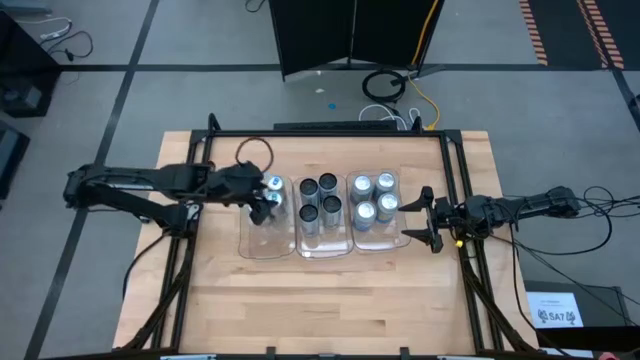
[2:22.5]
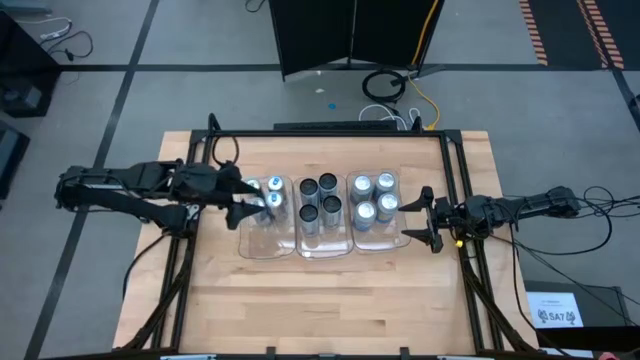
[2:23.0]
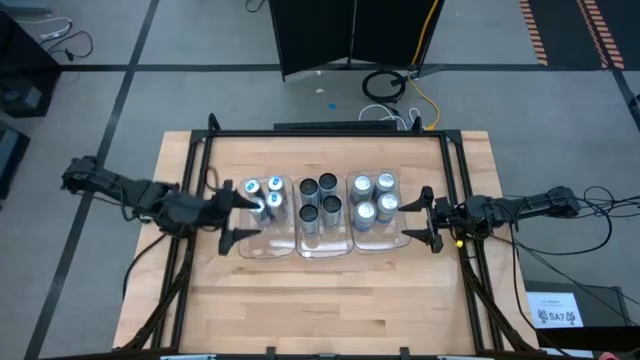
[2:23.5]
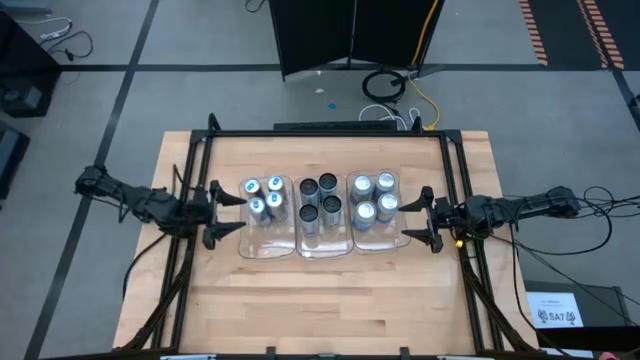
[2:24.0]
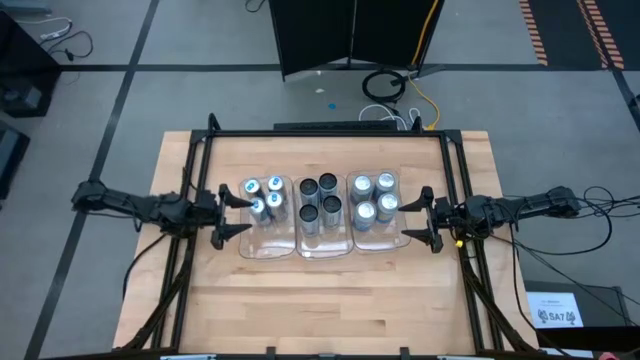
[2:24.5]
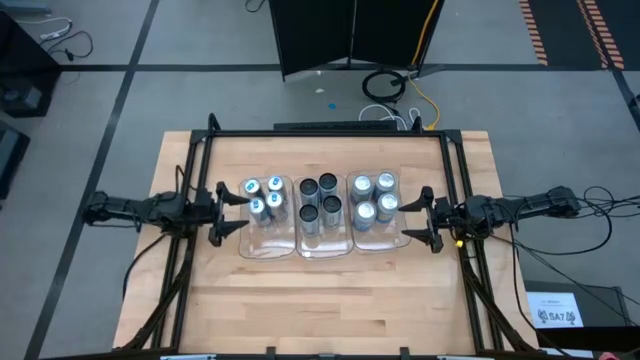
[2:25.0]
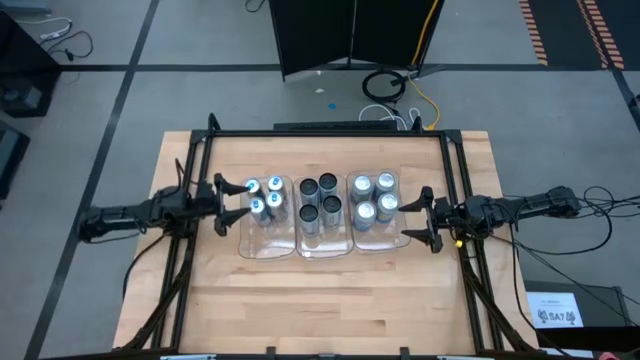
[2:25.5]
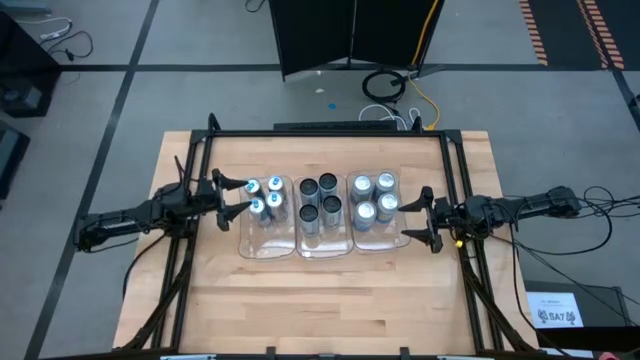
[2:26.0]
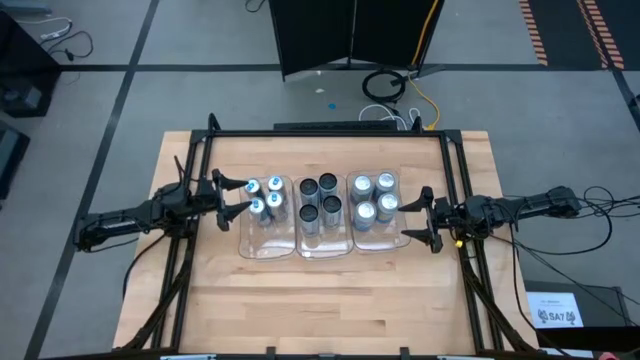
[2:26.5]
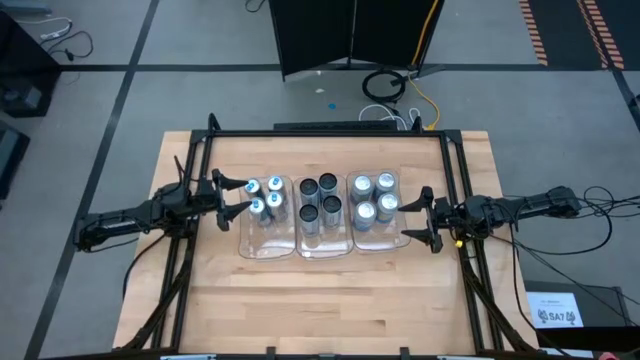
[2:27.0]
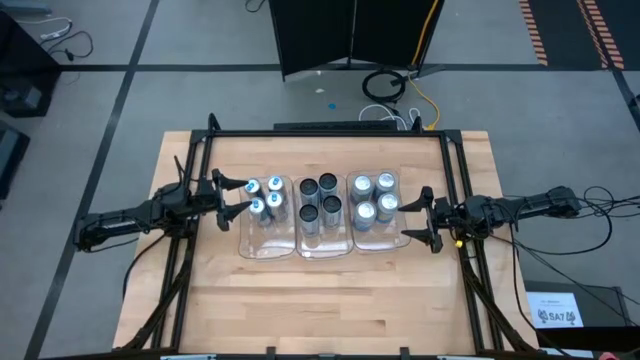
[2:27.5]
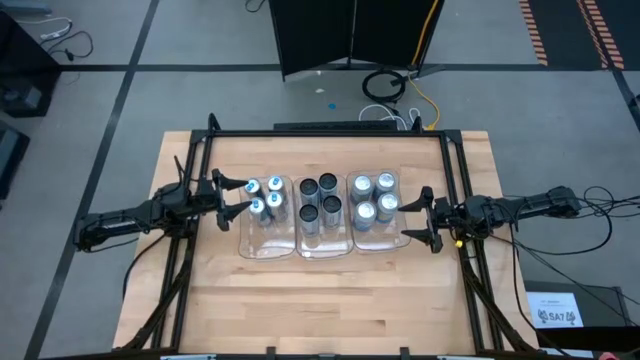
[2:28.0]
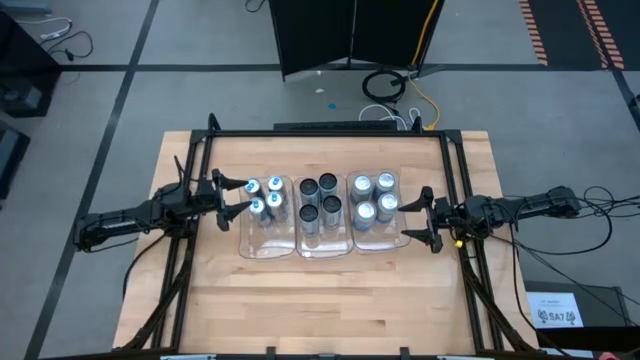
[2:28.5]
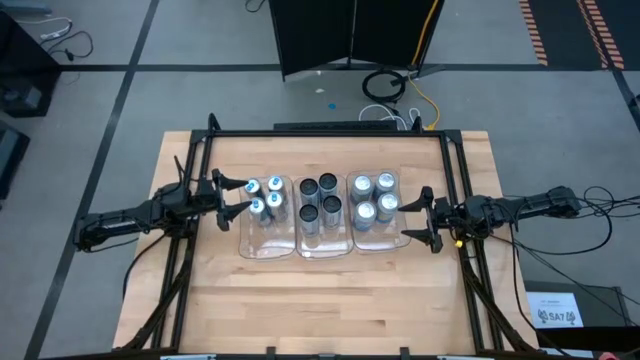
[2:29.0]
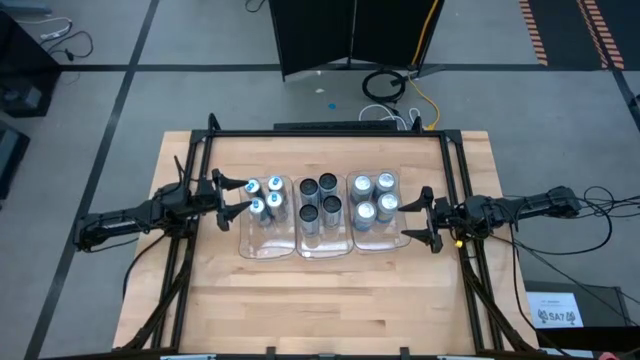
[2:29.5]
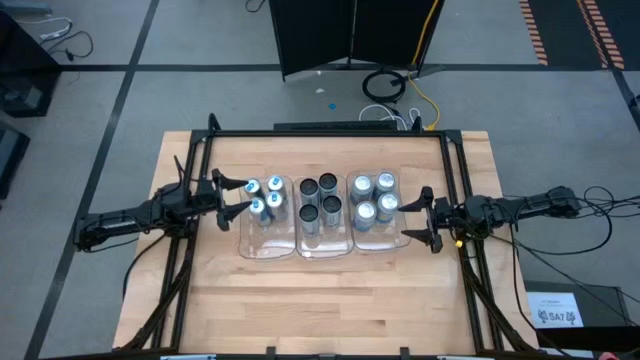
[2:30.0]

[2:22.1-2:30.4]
Task: Sort soda cans
Return to Home Position

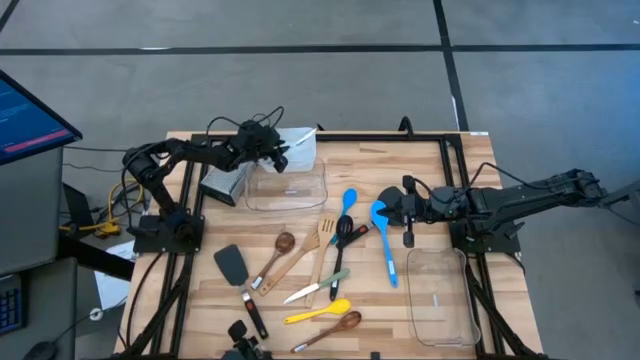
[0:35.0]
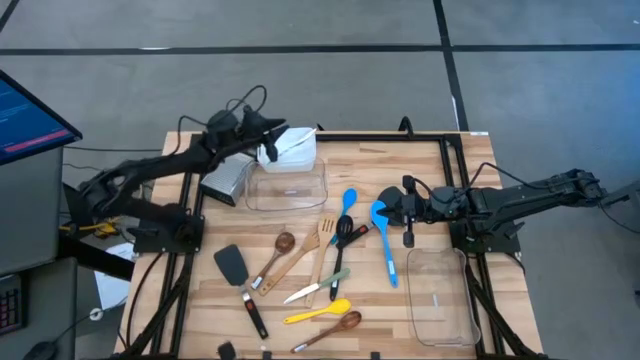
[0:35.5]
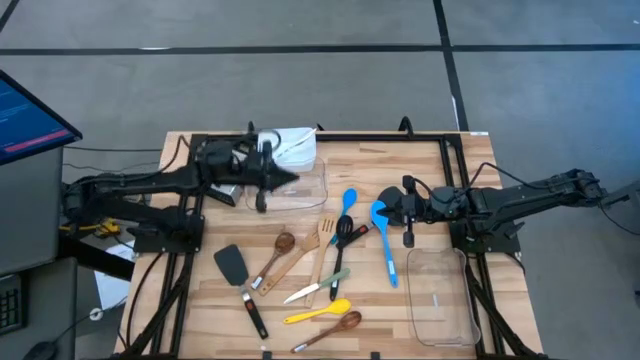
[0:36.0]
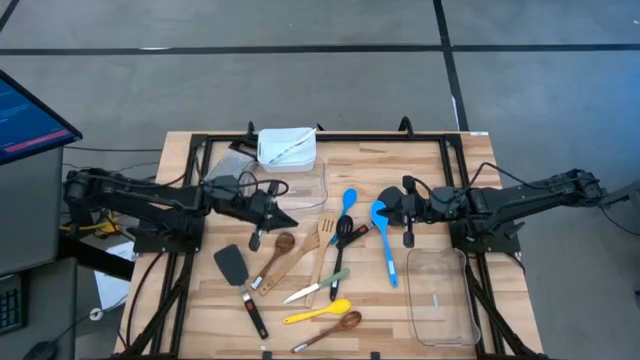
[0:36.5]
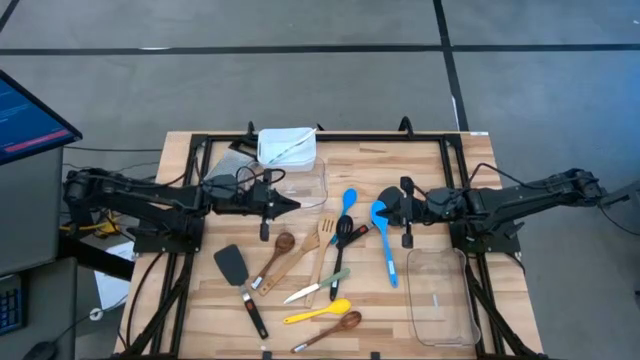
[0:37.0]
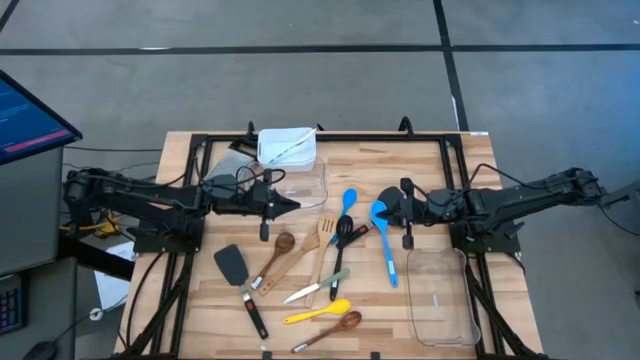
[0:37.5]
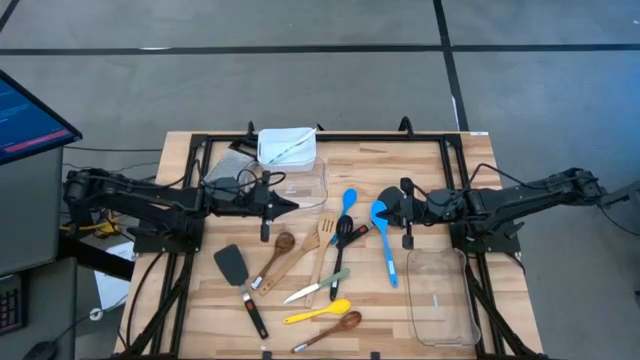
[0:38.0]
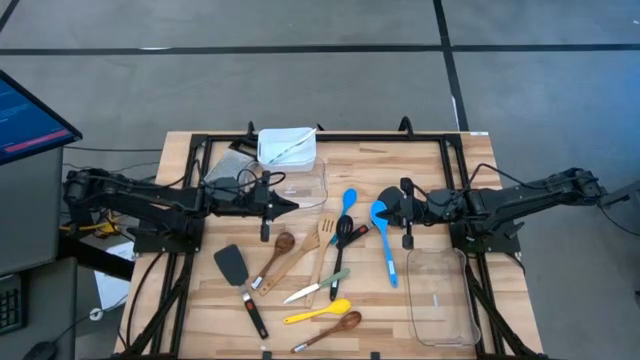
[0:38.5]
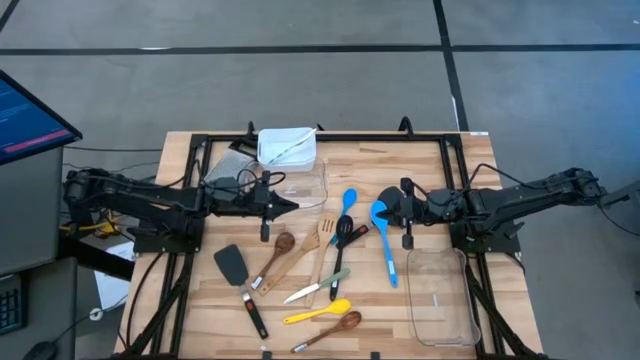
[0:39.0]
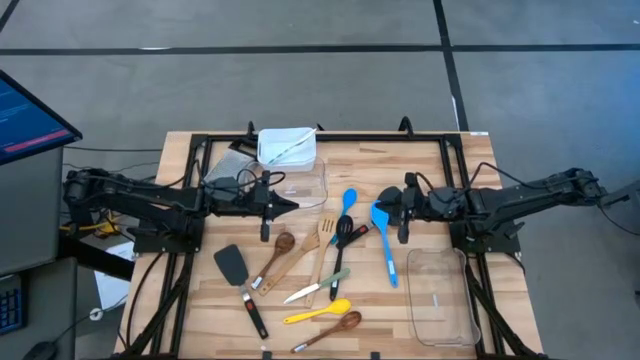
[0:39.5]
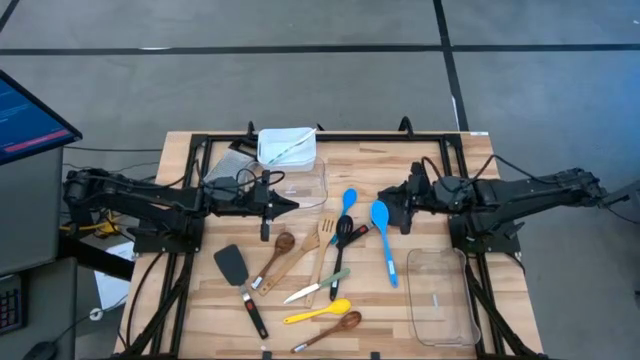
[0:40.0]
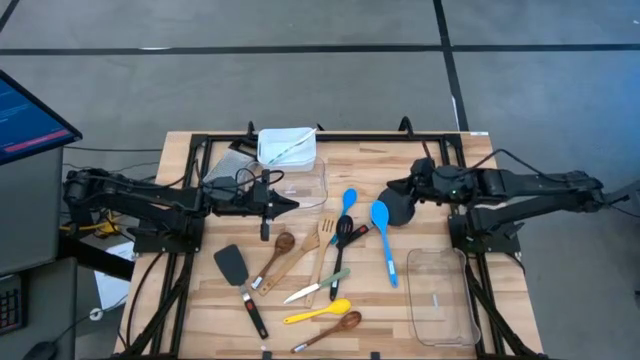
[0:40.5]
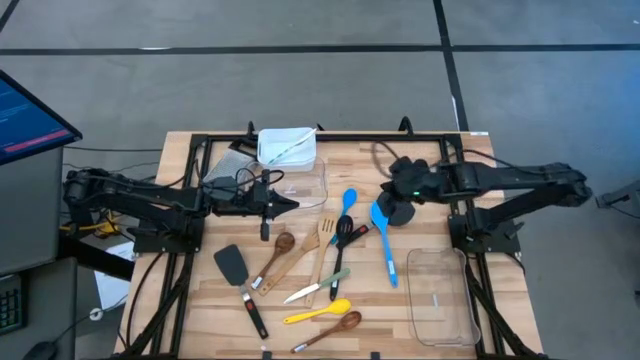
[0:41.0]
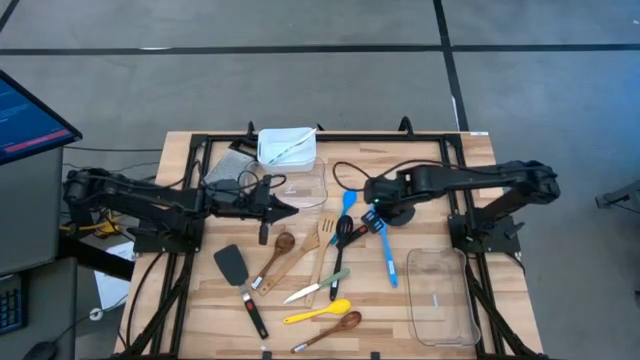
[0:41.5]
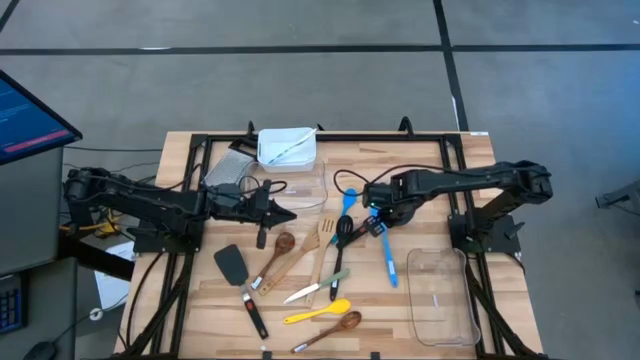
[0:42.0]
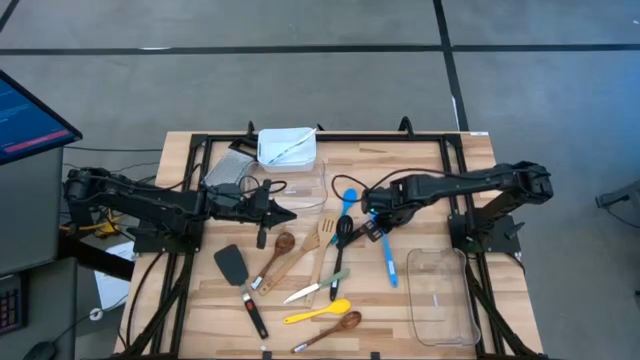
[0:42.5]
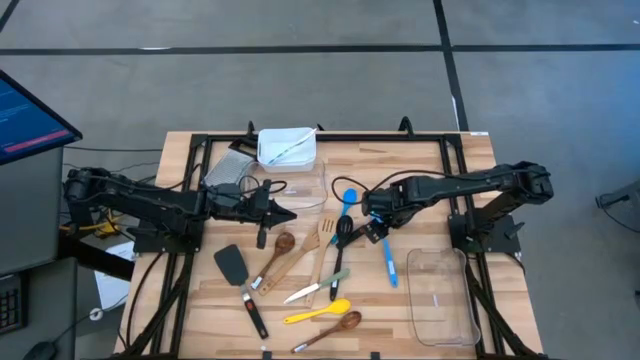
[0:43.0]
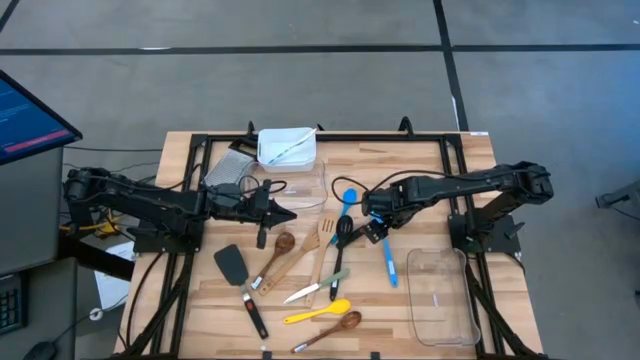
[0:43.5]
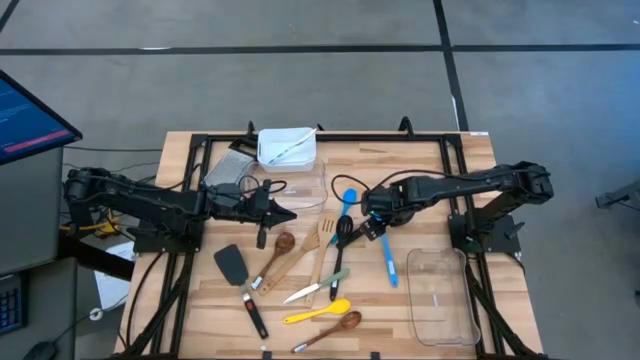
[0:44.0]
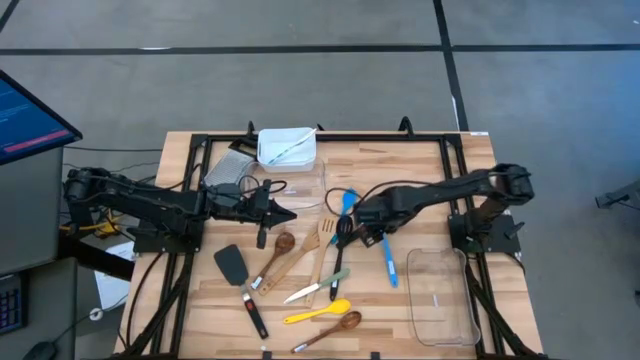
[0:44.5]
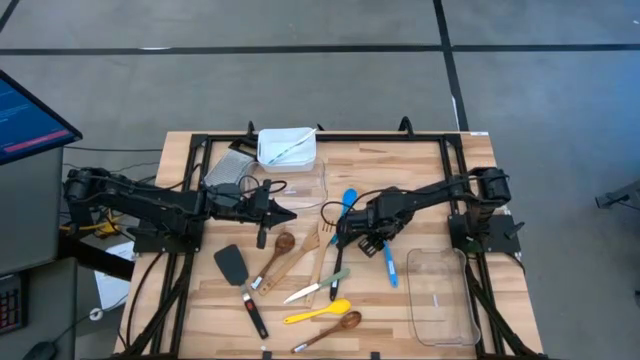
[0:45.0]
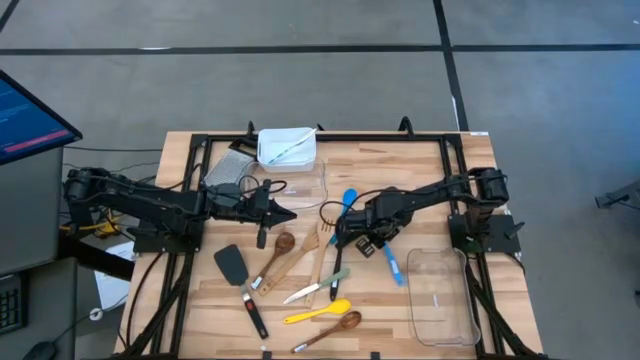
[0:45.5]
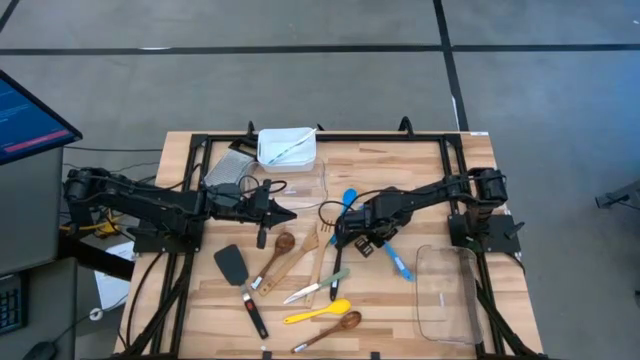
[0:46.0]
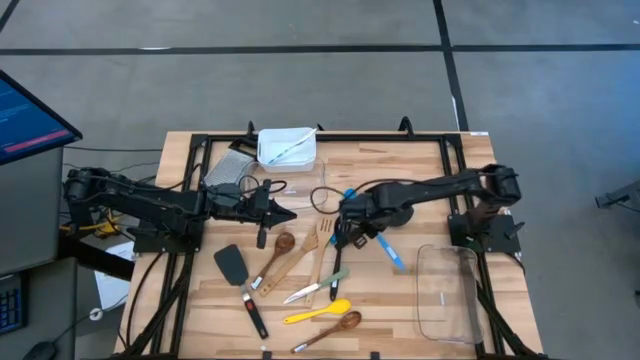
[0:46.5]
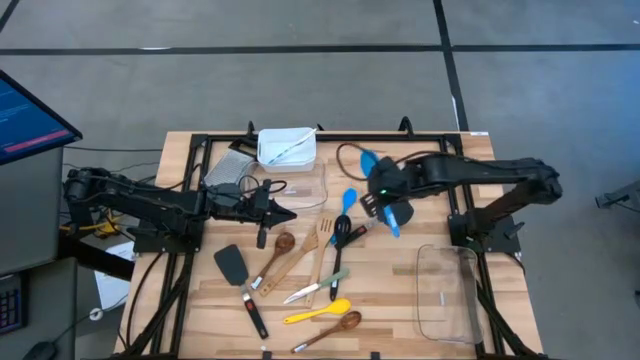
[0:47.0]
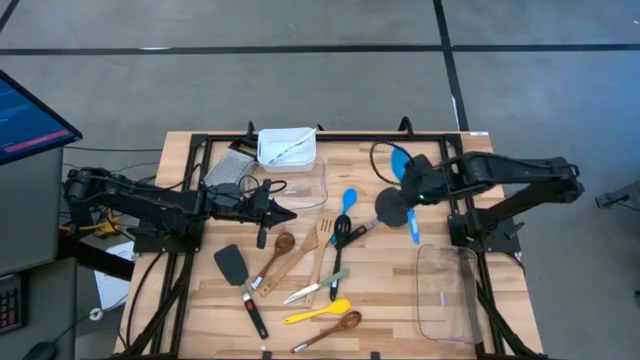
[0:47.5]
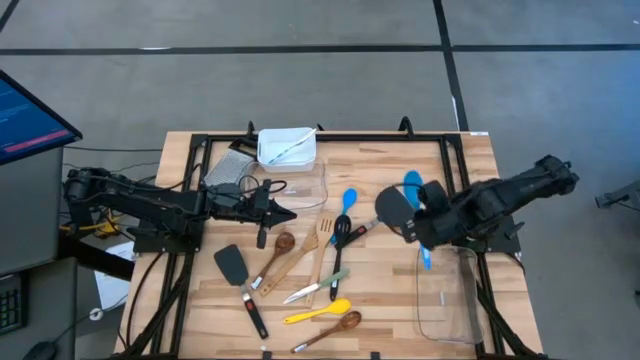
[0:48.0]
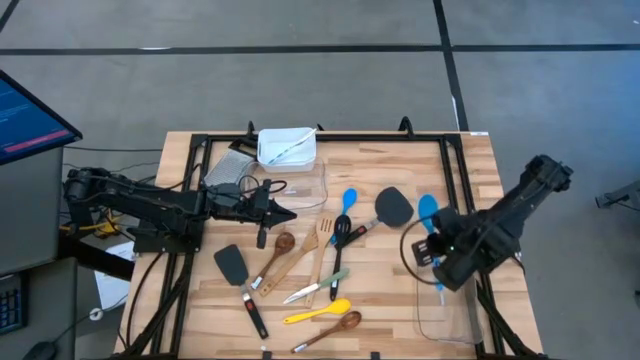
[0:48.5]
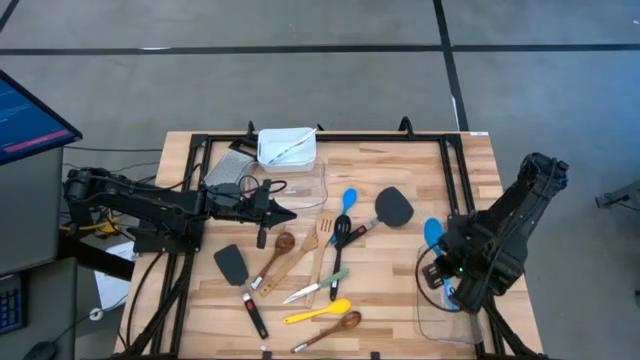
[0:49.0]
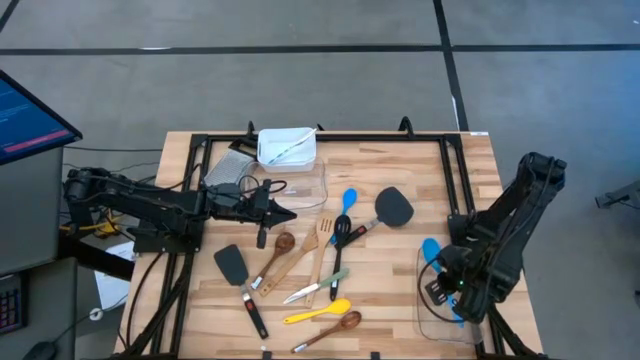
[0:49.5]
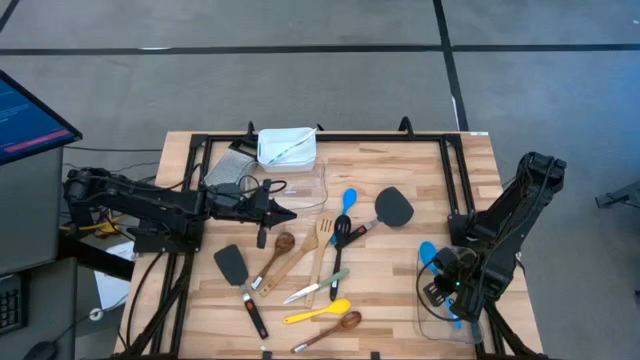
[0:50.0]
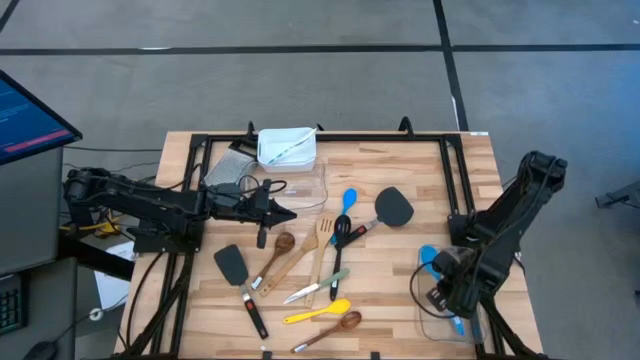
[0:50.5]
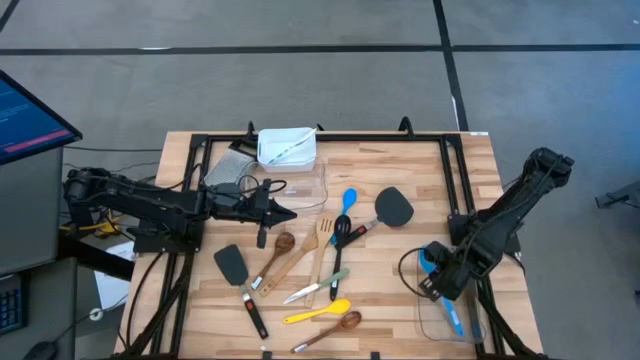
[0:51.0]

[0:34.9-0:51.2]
Task: Pick & Place Kitchen Items
Put the blue serving spoon into the bottom transparent bin
